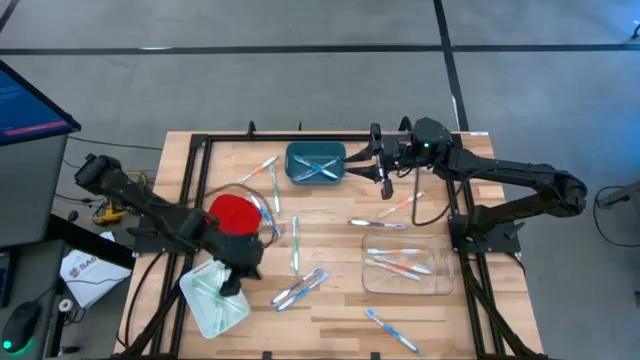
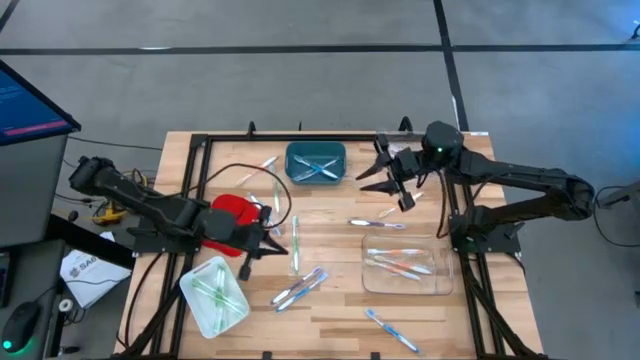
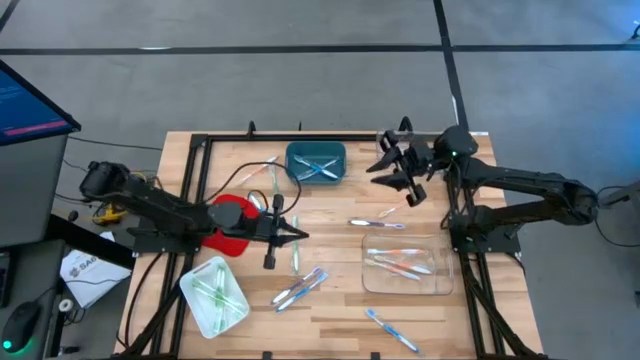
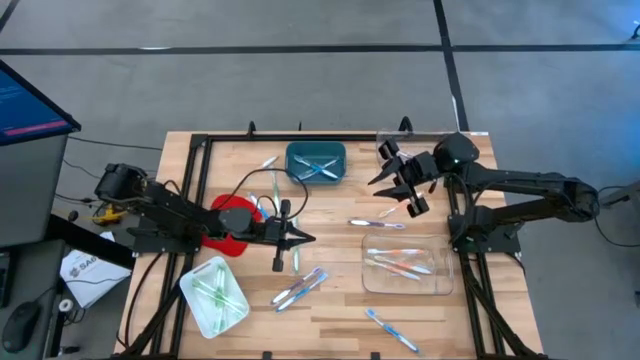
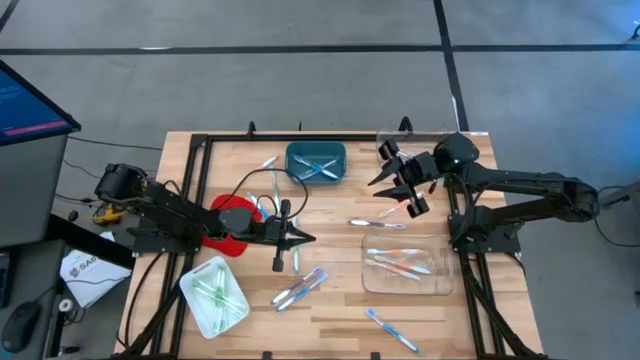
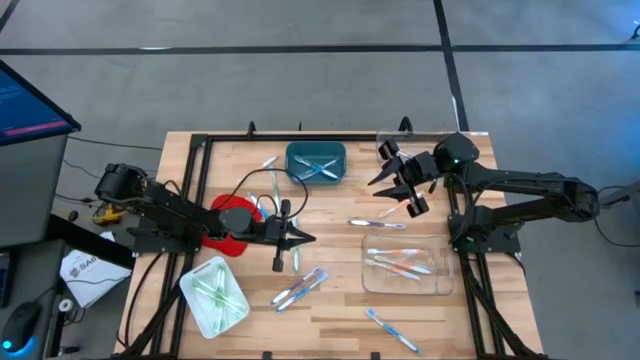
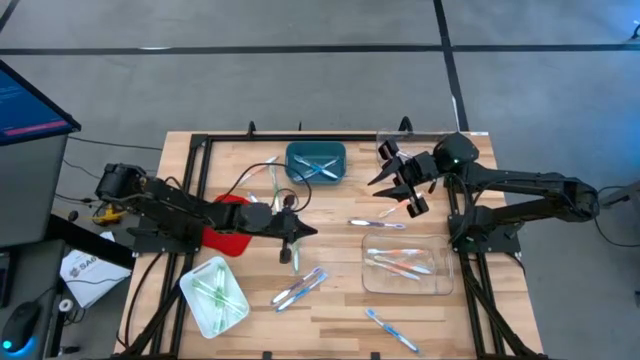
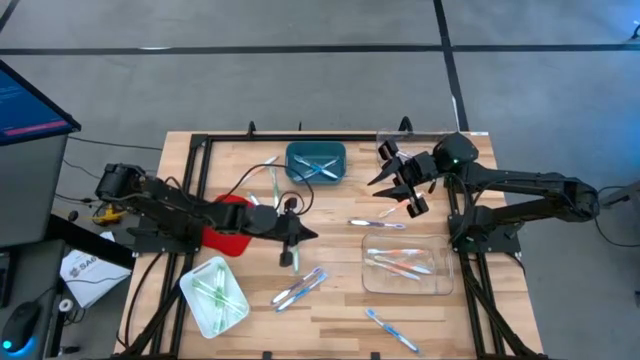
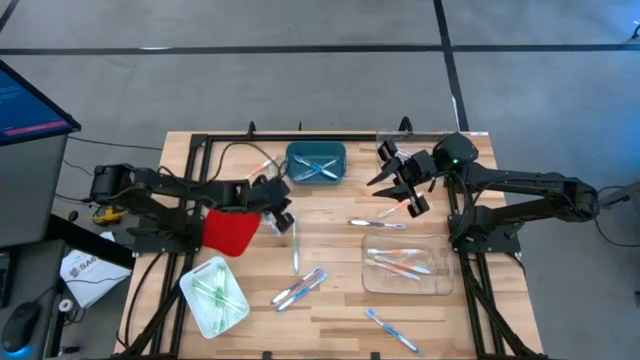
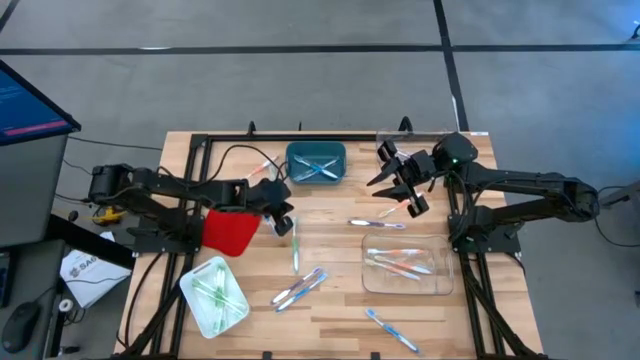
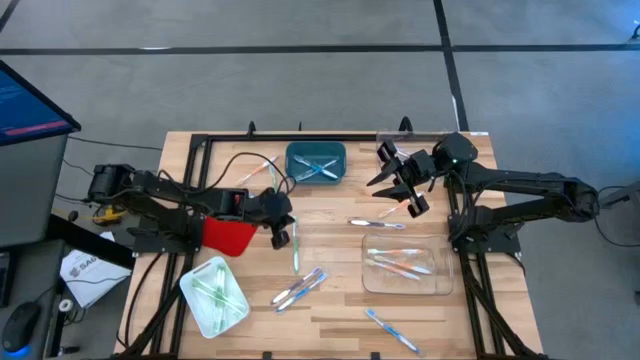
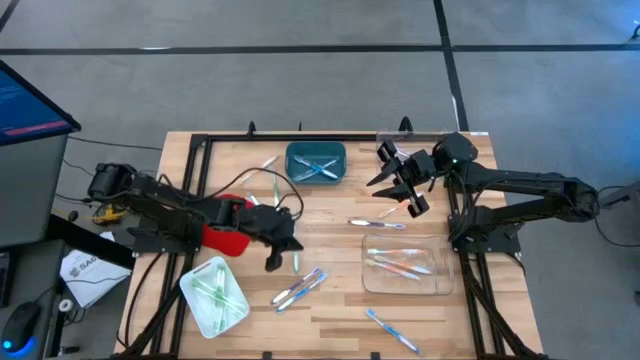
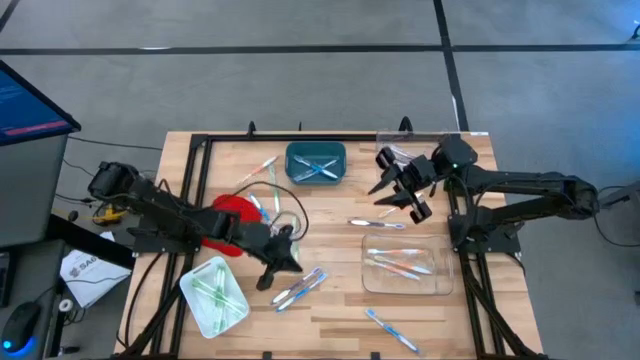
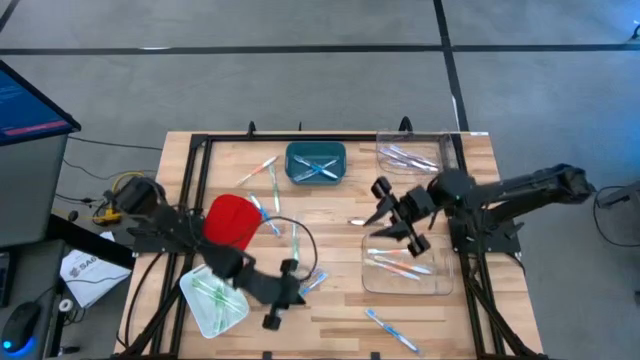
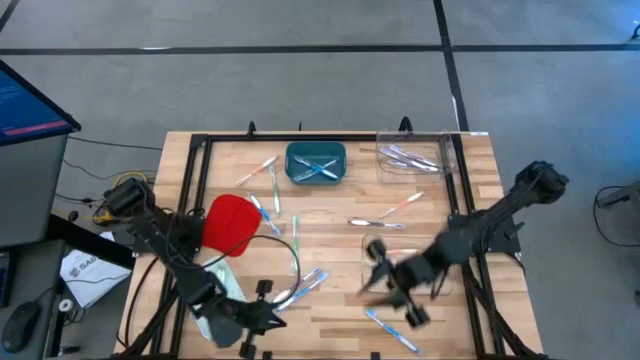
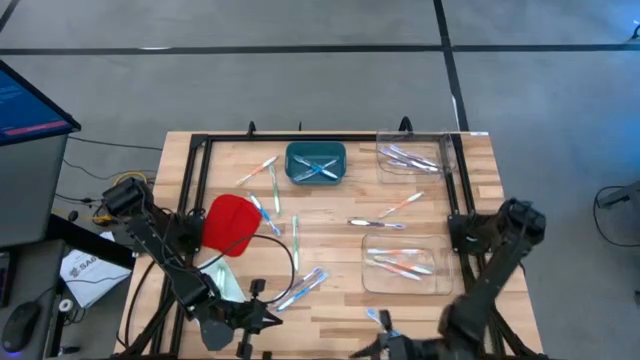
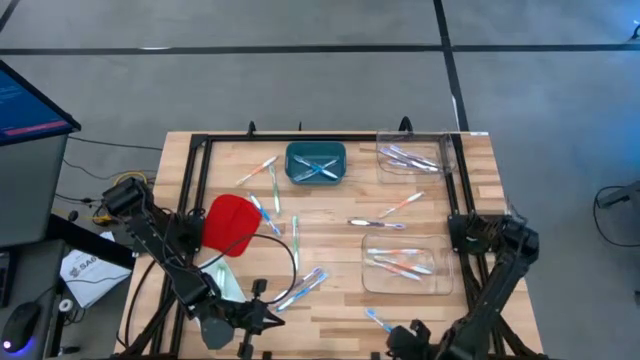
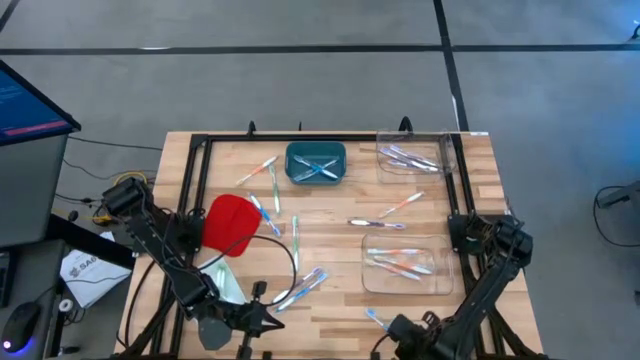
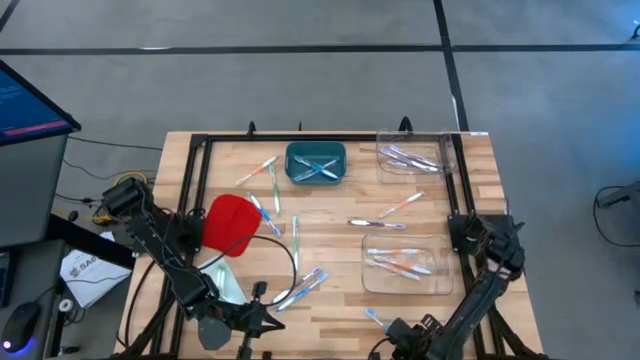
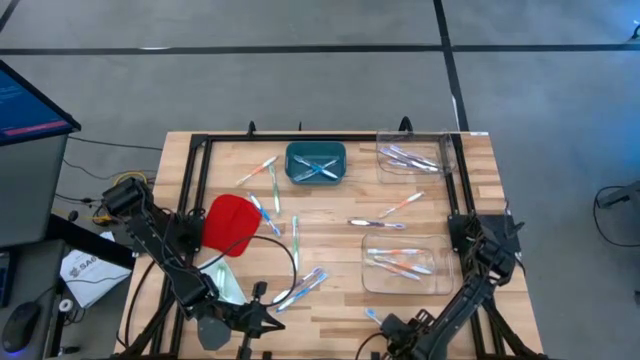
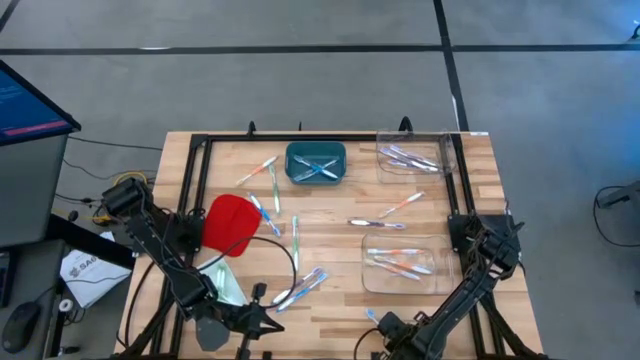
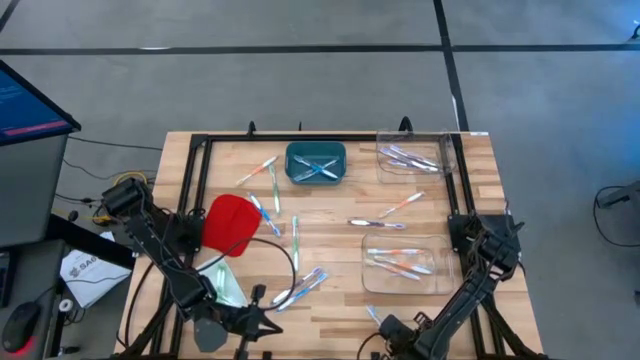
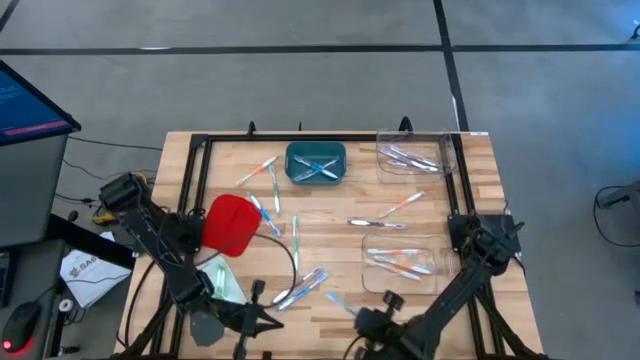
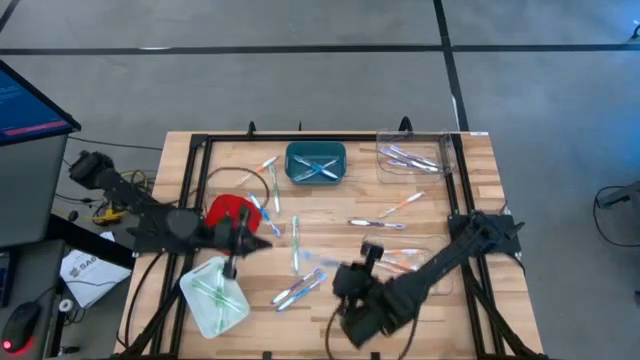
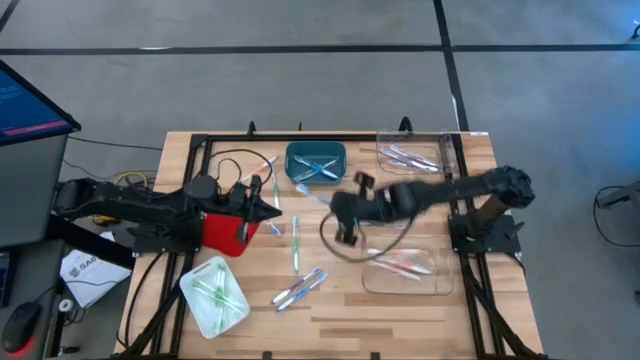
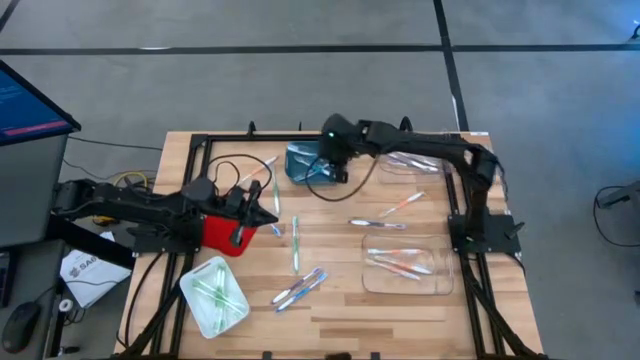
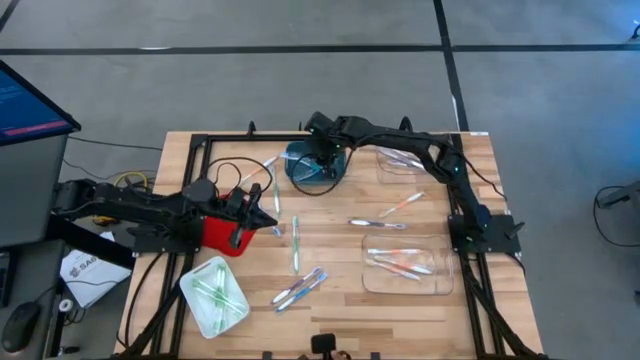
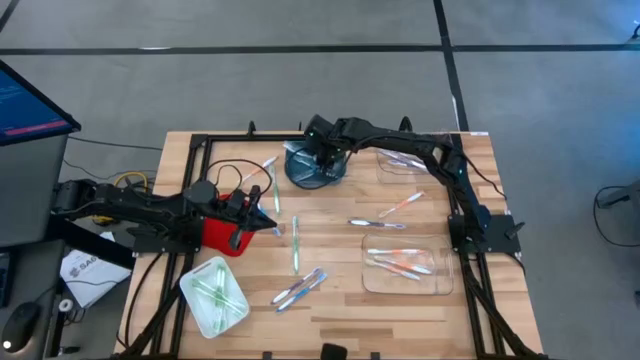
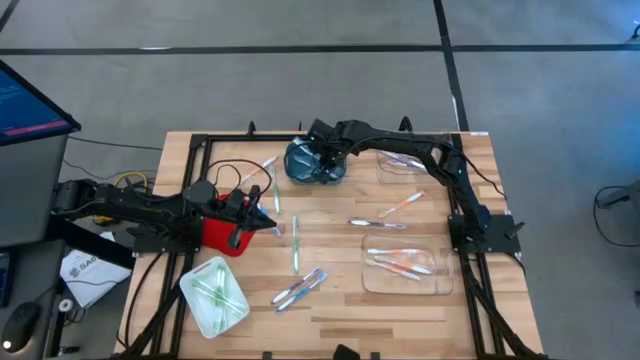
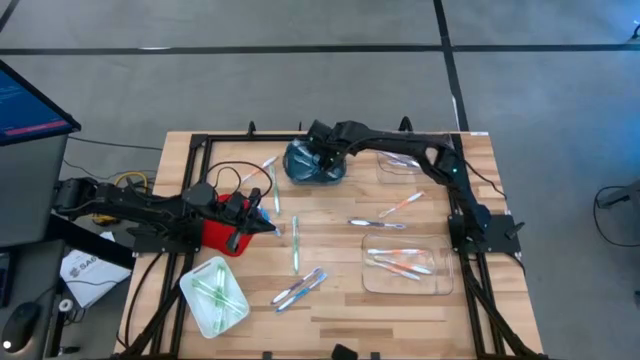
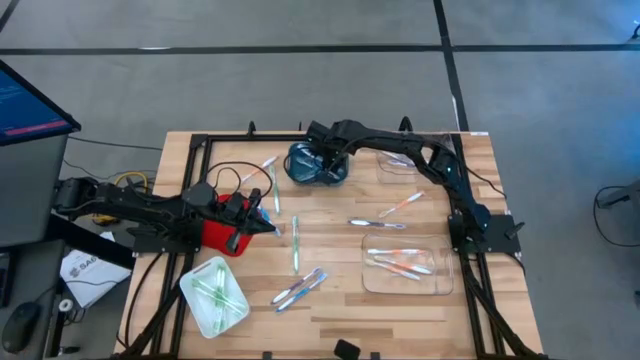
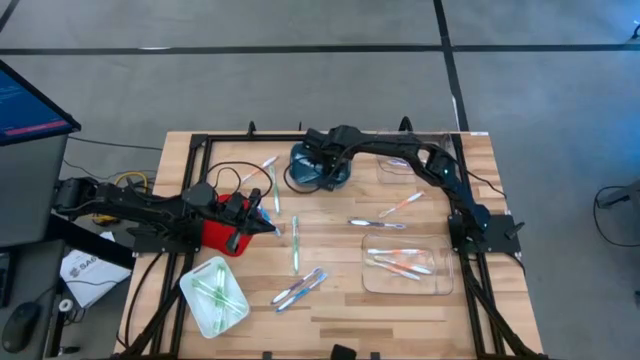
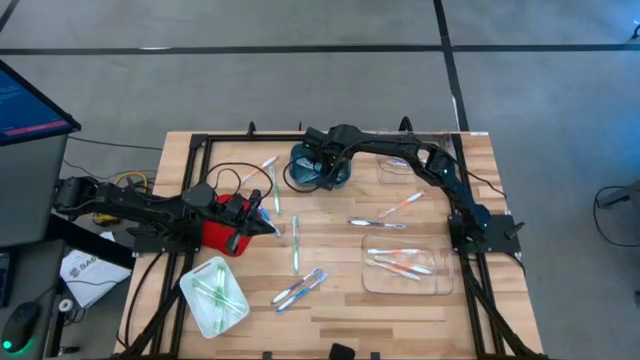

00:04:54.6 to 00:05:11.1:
Task: Pick & Place Toothbrushes
Put the blue toothbrush into the blue bin

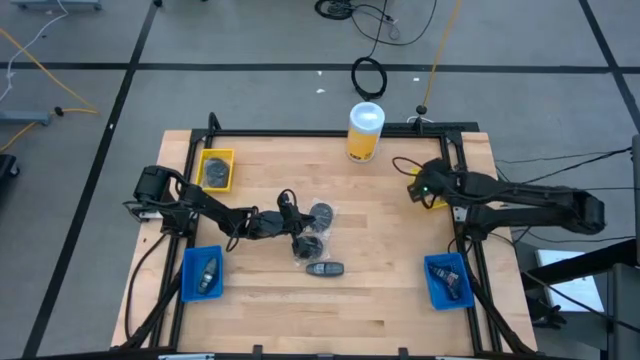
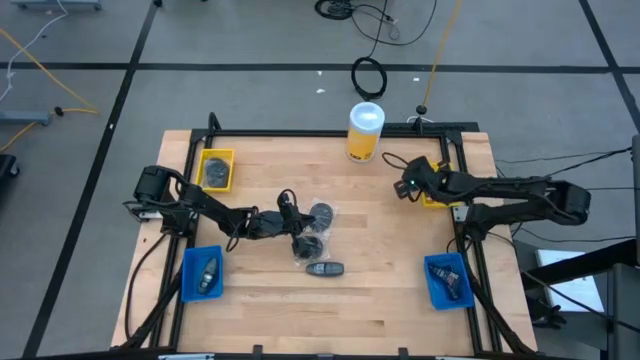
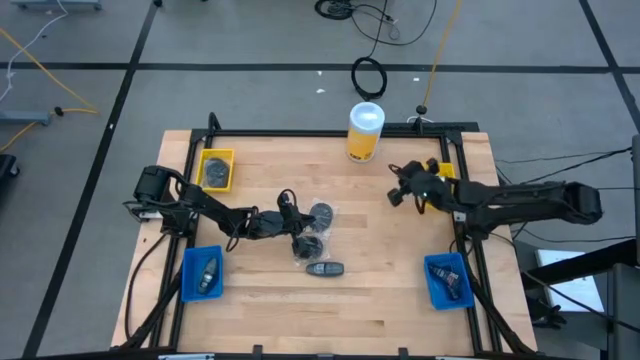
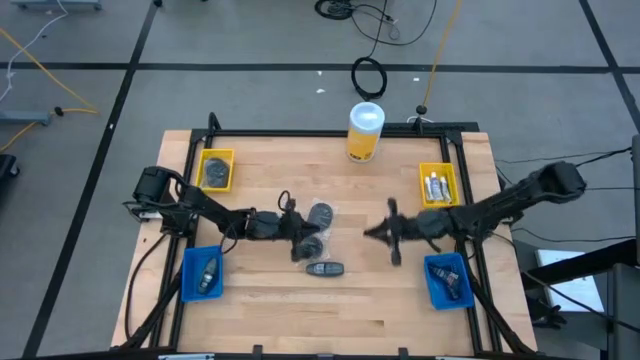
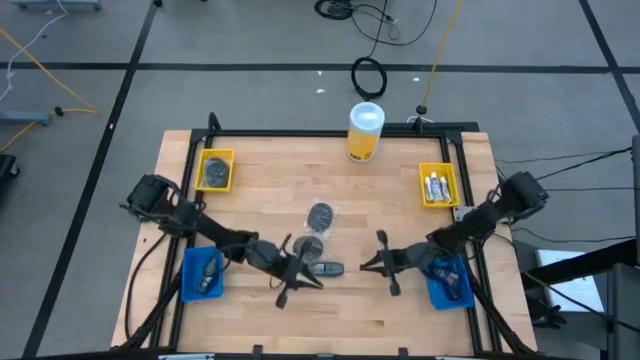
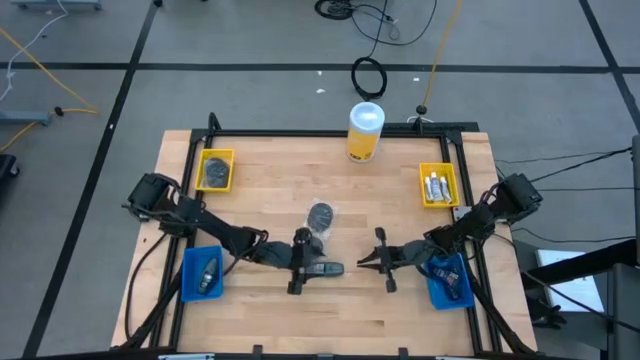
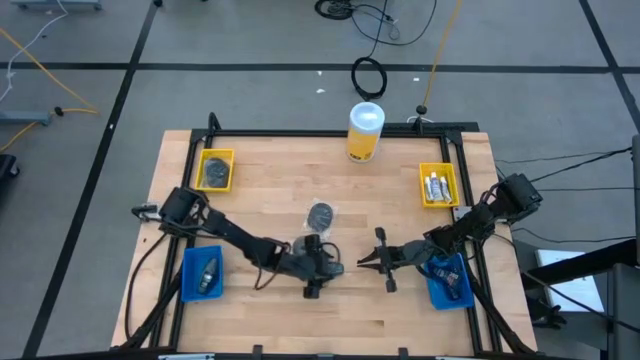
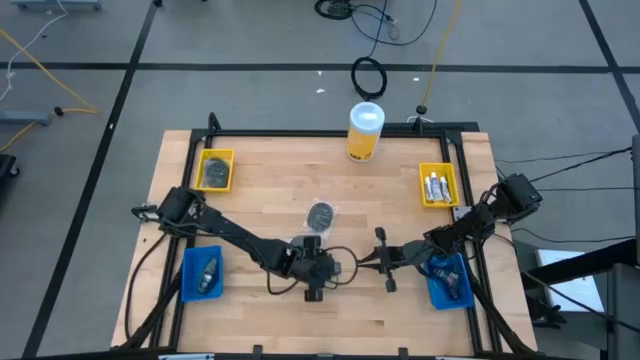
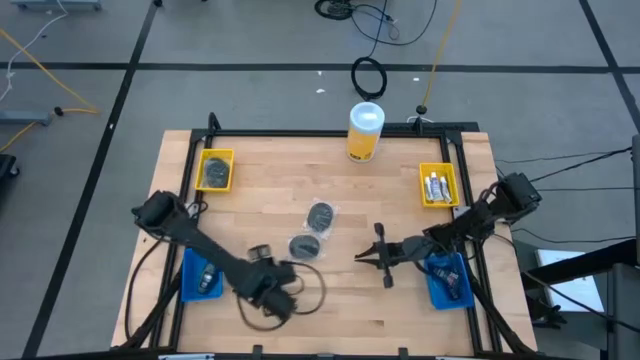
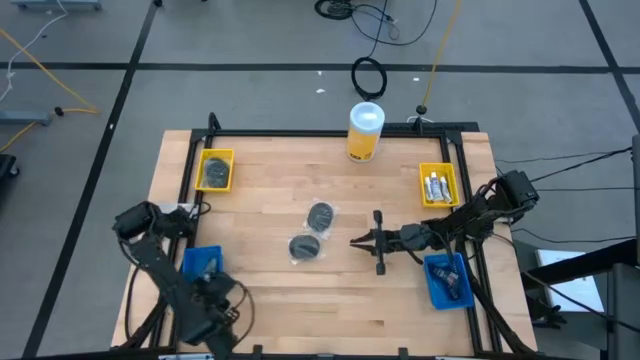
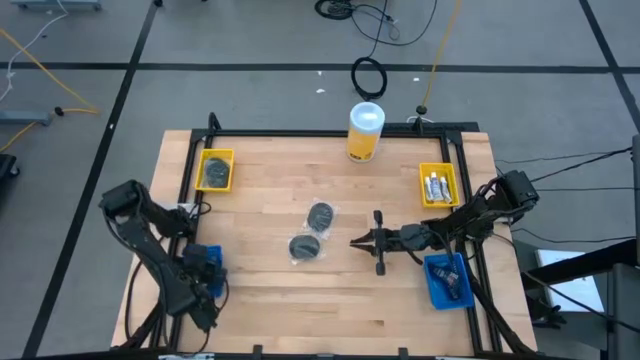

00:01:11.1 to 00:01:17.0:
Task: Pick & Place Travel size toiletries
Adjust the right yellow bin
